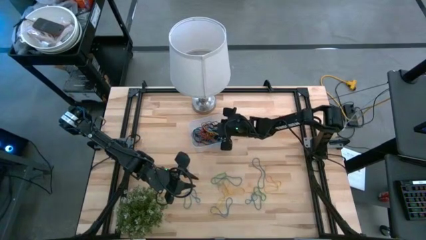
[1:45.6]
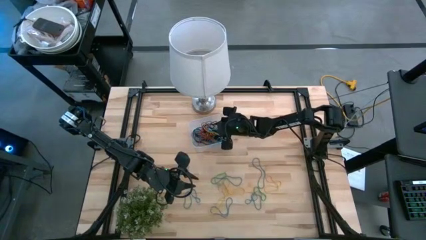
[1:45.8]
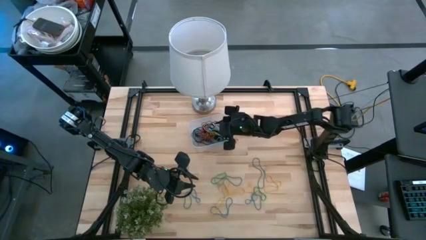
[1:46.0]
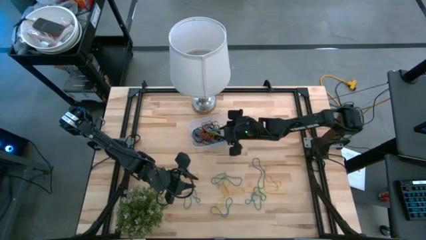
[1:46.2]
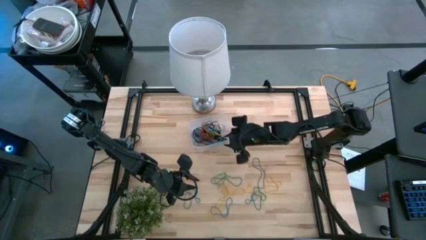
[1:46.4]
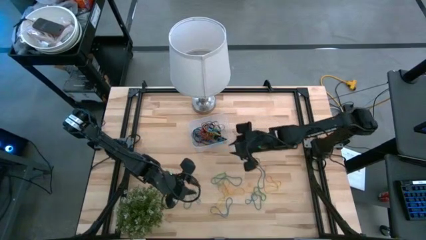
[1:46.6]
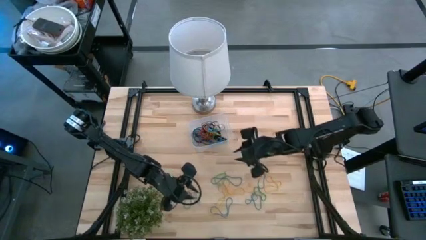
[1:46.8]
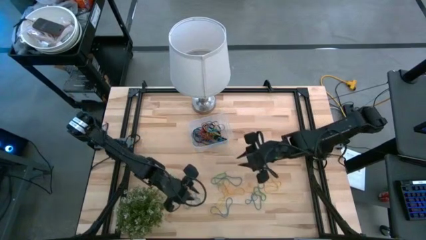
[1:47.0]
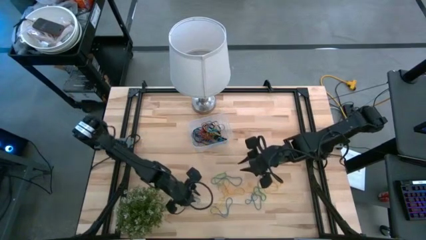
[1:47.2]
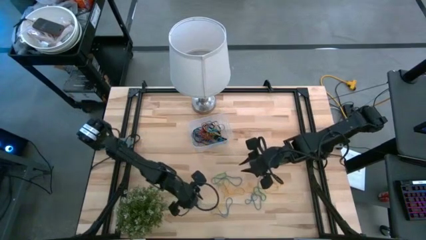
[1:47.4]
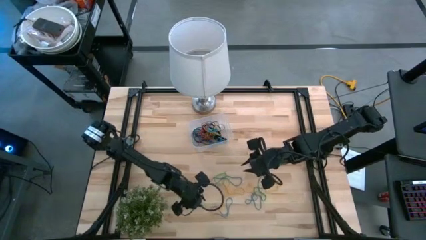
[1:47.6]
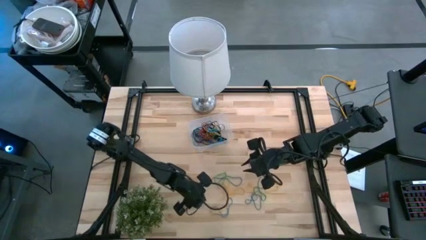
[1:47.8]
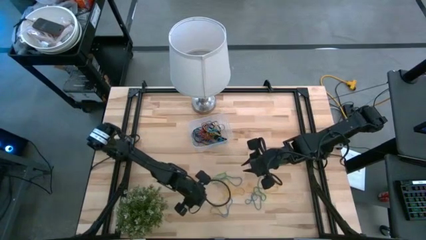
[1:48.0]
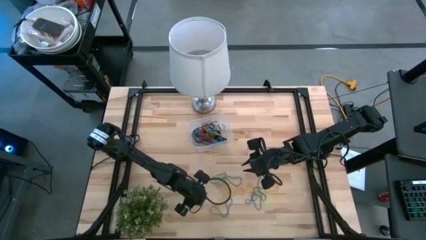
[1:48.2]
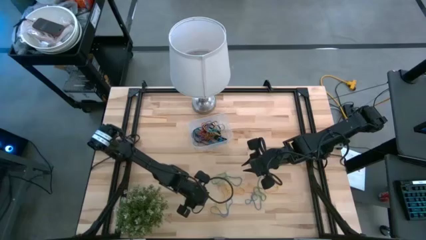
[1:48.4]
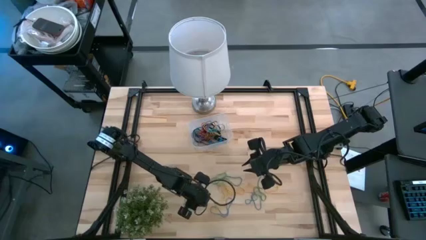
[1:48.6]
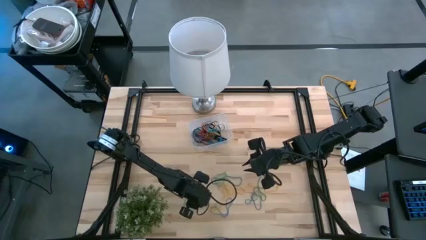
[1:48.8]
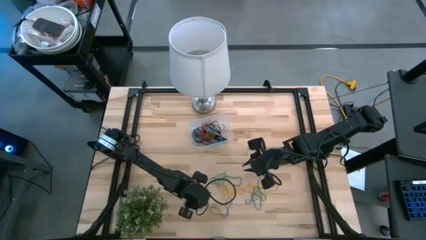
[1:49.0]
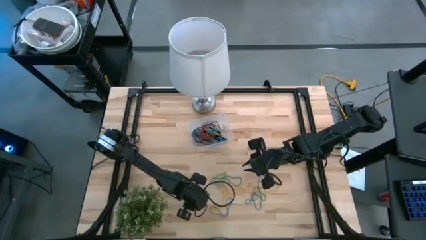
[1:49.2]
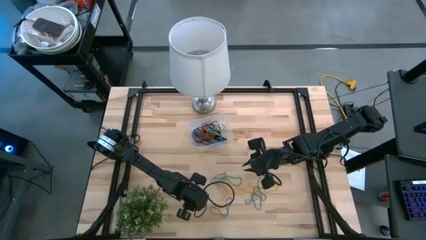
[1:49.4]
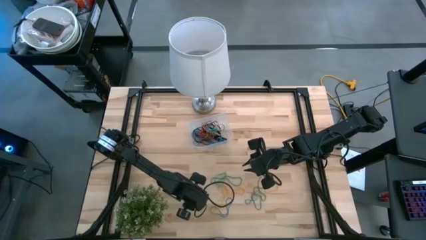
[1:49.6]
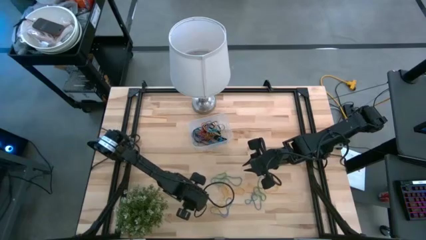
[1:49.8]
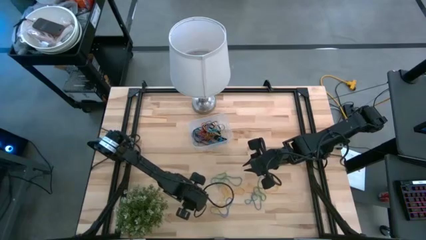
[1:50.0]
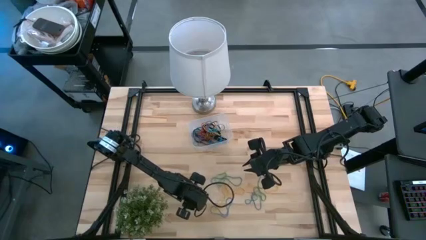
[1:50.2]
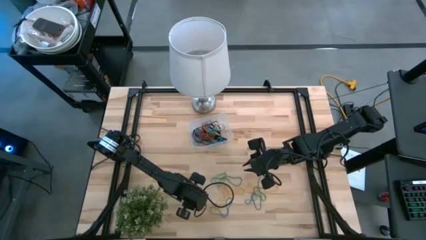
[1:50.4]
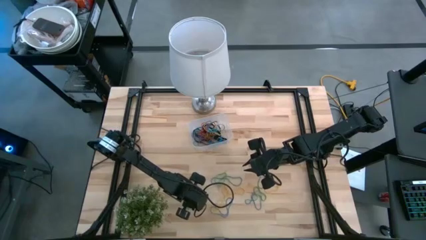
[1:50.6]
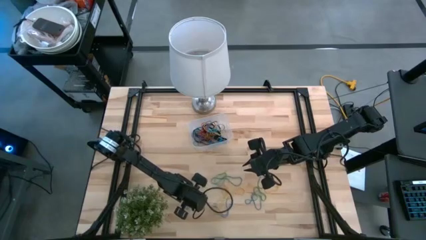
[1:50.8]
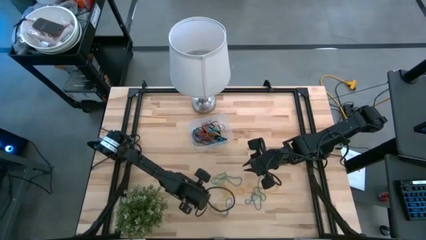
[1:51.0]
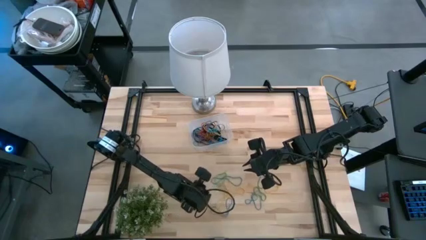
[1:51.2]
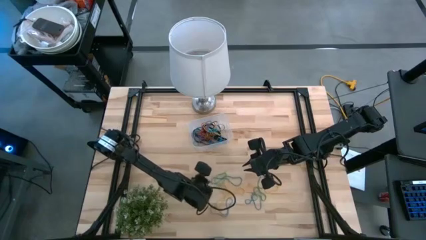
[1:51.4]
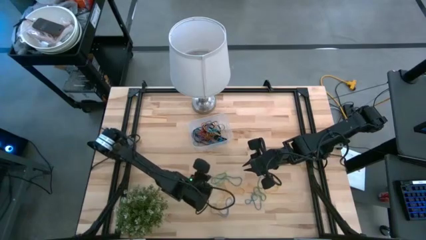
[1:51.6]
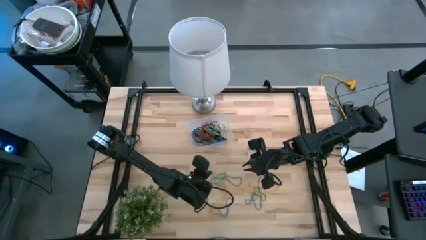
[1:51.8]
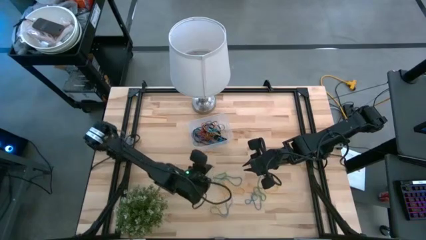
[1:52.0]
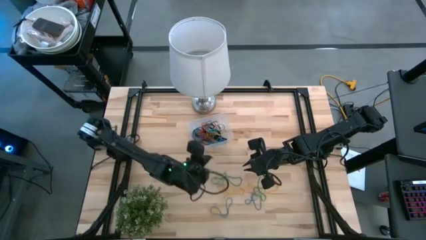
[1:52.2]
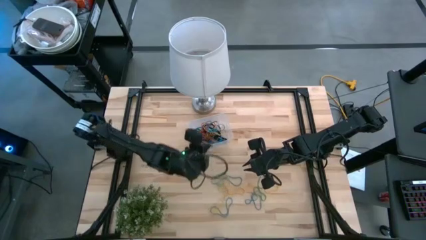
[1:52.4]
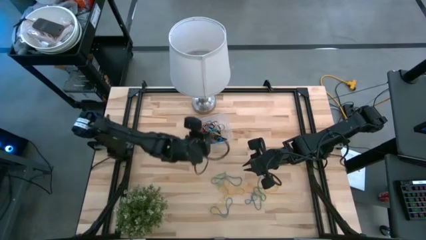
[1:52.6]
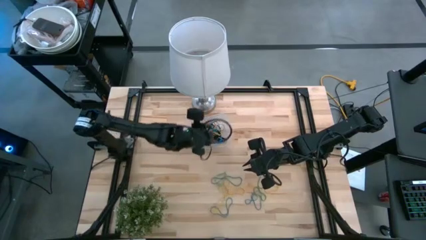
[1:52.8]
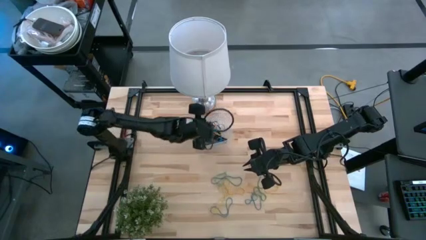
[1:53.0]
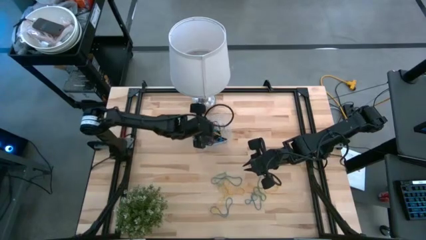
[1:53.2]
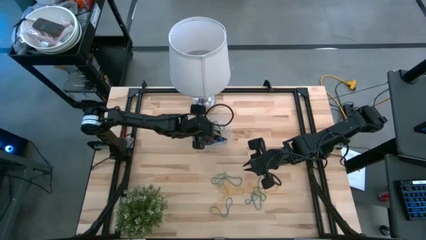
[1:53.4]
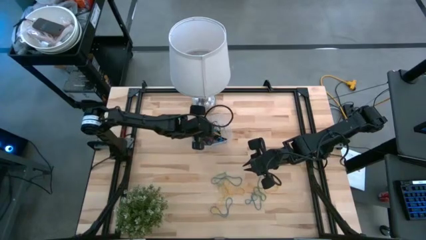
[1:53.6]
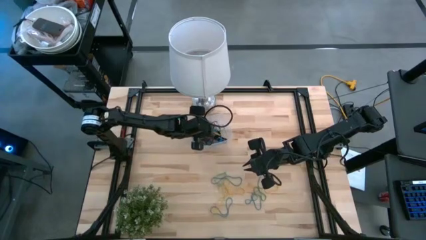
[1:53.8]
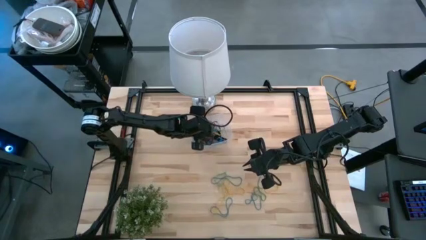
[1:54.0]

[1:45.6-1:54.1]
Task: Pick and place rubber bands into bin
Put the blue rubber band into the transparent container

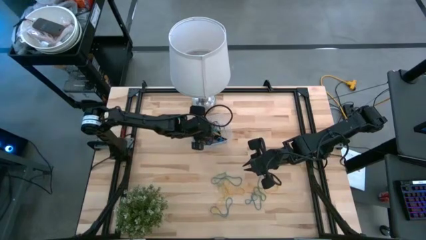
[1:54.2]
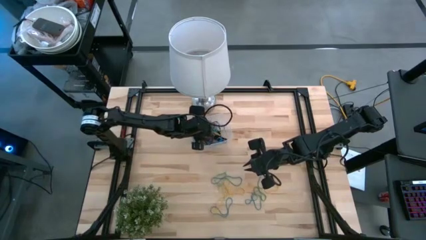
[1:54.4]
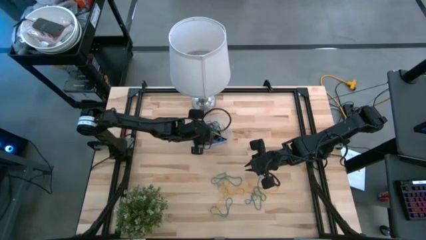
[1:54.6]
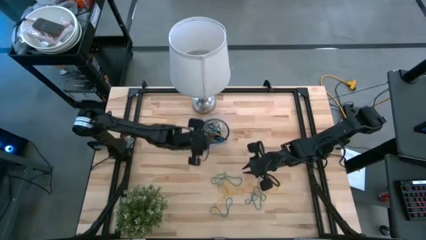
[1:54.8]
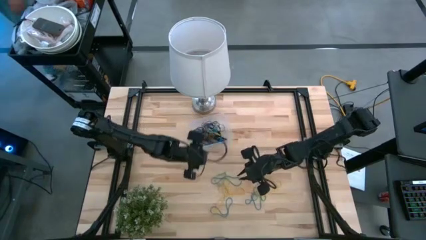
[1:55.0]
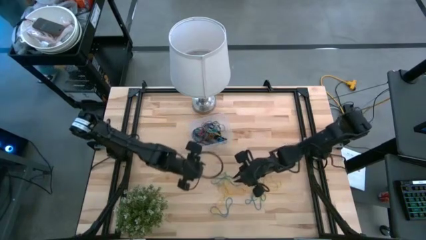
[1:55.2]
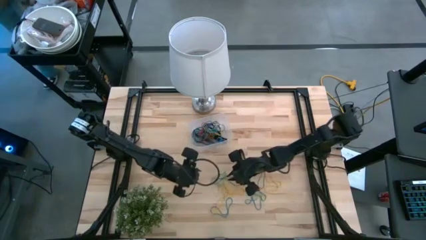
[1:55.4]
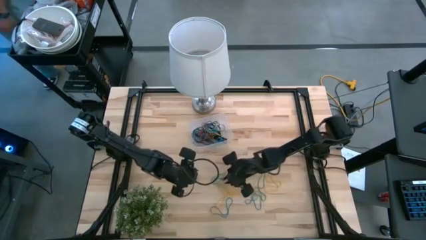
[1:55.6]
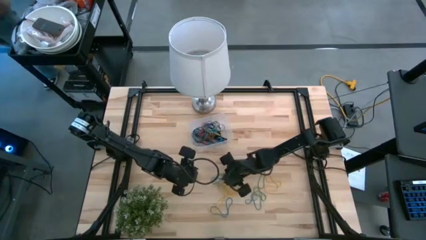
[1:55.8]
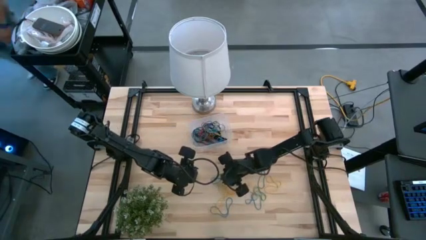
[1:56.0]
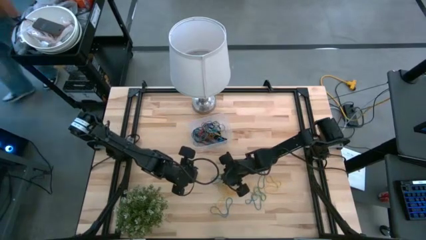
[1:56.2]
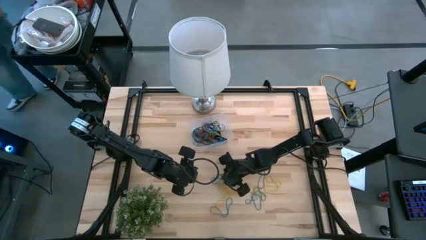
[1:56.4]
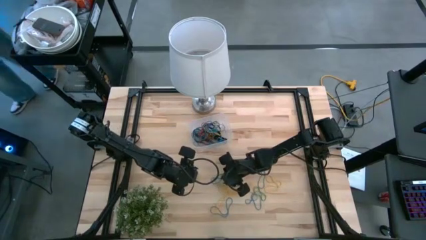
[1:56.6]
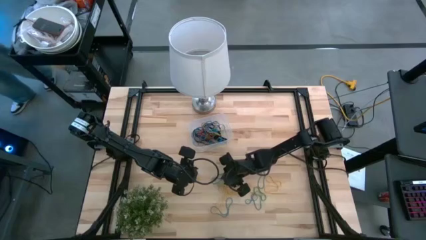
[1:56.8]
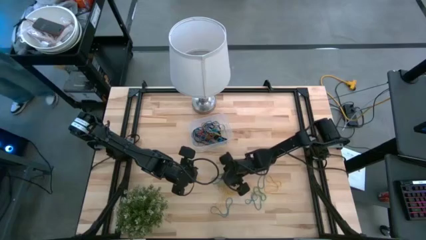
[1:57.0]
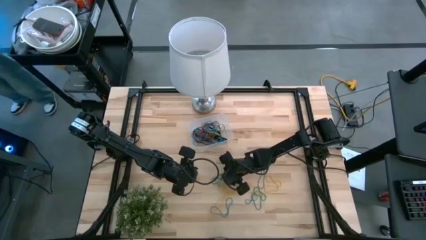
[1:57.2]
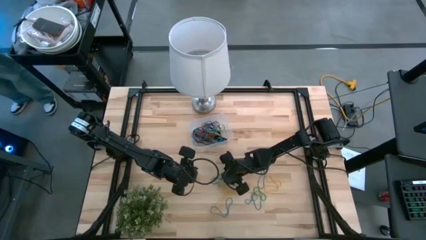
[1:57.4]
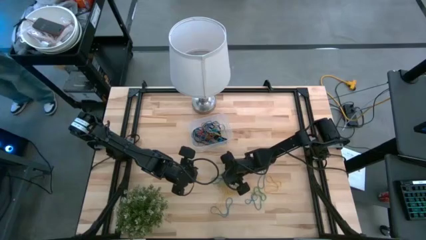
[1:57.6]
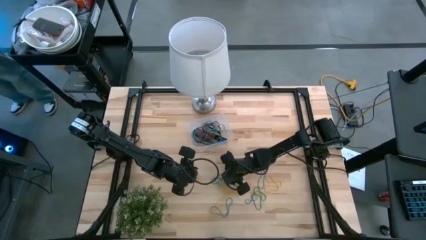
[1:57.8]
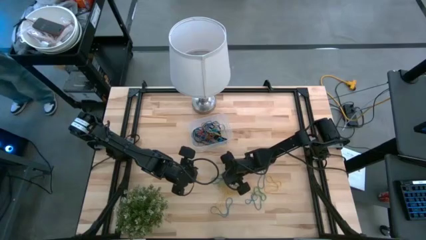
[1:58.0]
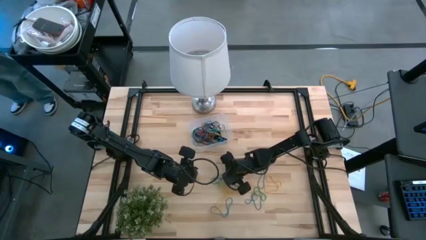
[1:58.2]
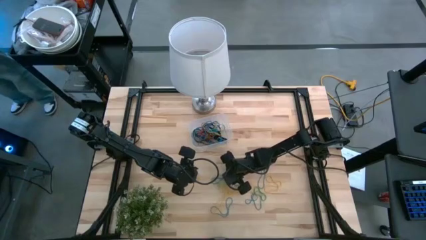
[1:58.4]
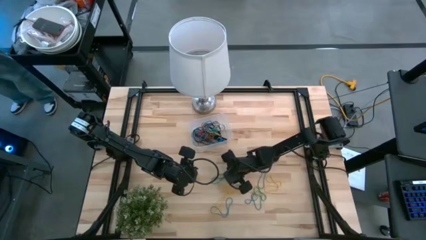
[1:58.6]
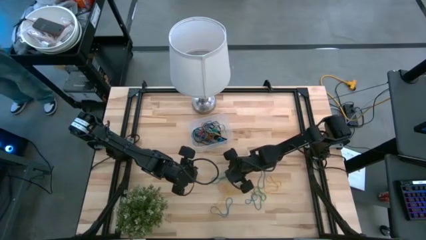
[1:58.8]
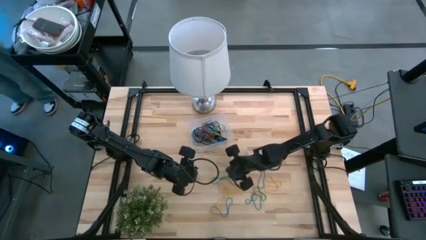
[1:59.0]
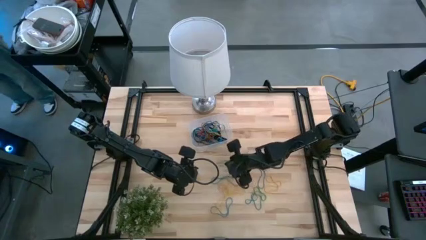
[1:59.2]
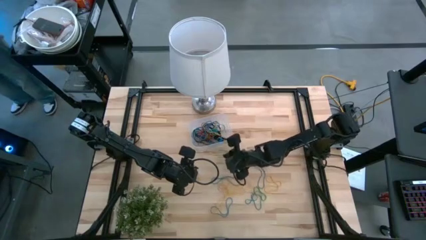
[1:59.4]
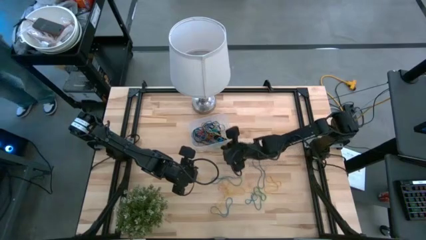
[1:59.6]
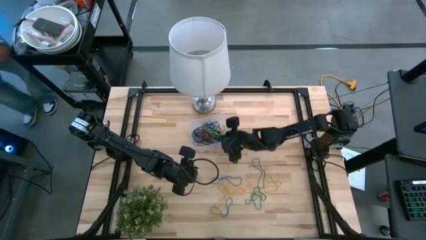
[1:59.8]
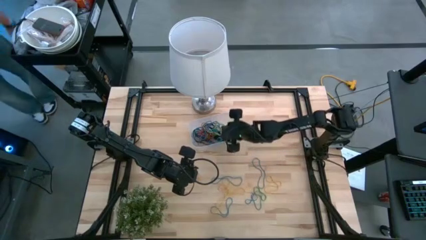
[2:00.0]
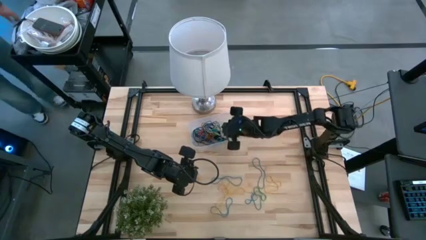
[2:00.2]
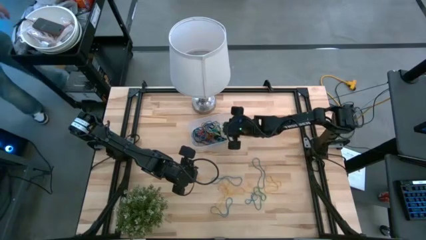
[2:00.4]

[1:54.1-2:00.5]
Put the green rubber band into the transparent container

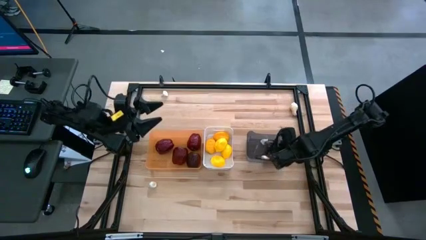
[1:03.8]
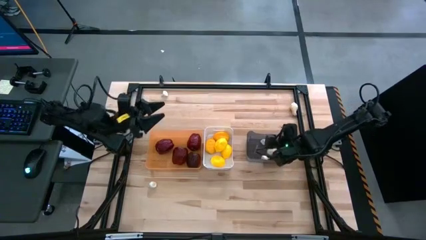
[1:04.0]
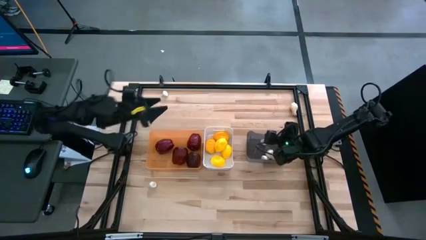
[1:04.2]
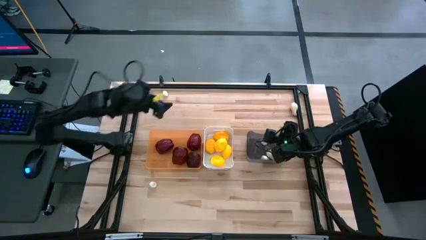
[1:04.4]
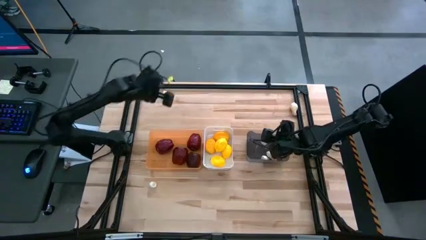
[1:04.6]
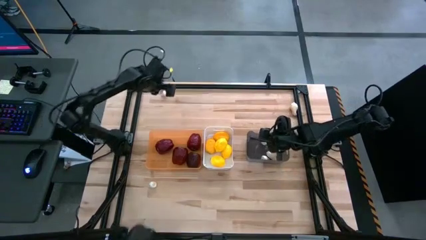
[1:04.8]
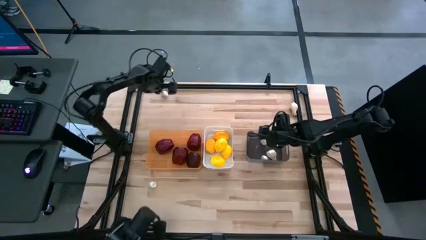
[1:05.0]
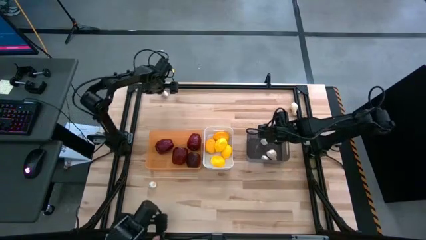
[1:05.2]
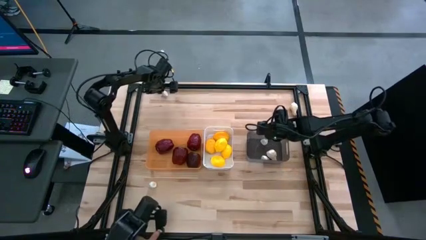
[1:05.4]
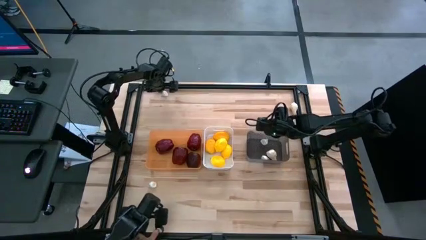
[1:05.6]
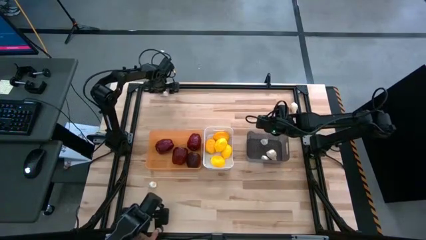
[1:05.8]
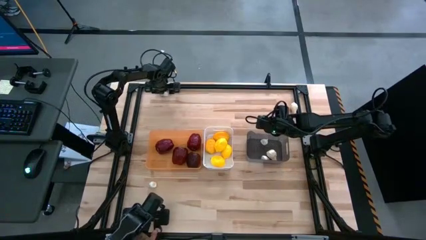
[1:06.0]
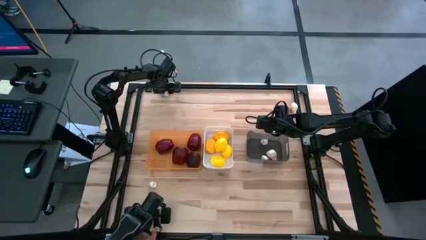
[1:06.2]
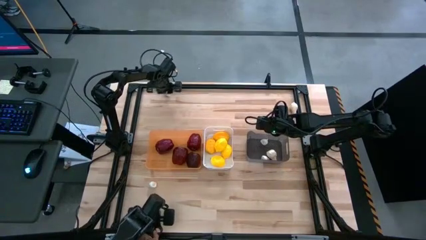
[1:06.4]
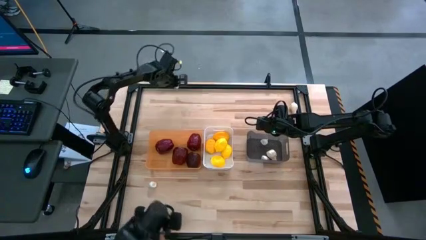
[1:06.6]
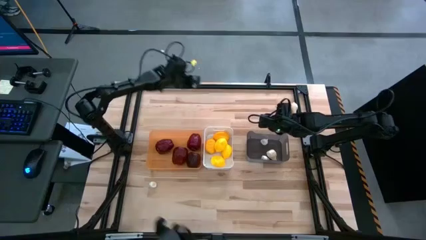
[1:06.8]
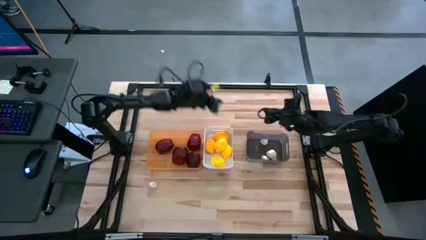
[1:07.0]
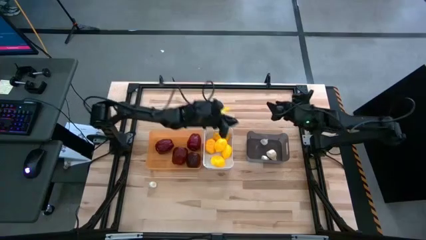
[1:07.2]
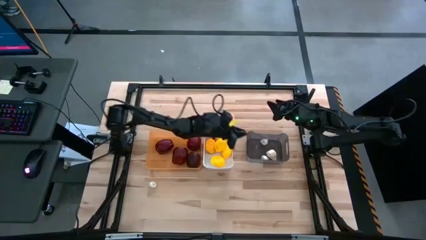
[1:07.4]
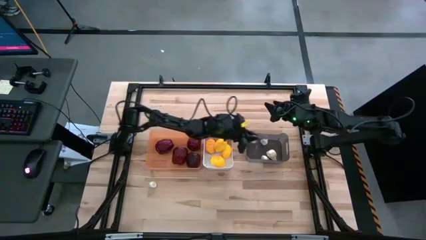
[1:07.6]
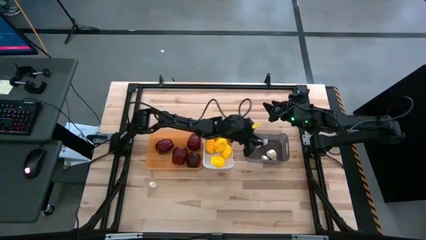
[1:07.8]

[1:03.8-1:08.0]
Task: Sort produce into baskets
Put the white garlic into the black bin
